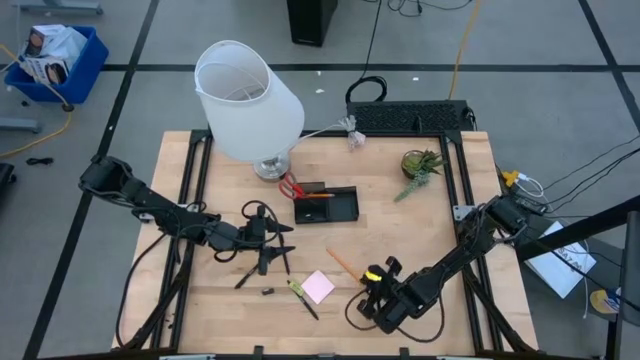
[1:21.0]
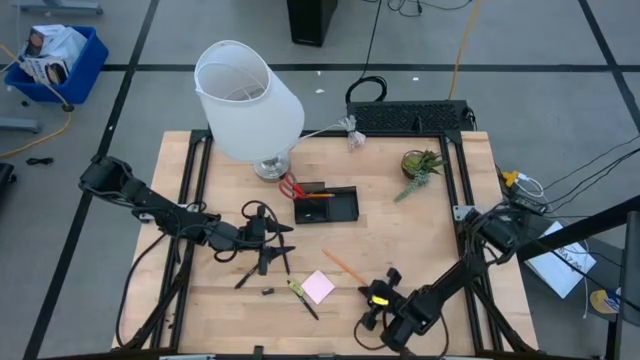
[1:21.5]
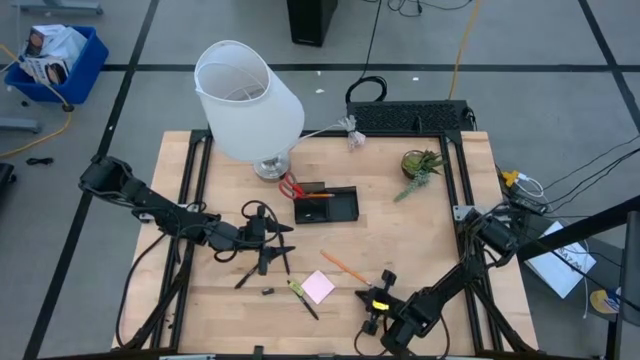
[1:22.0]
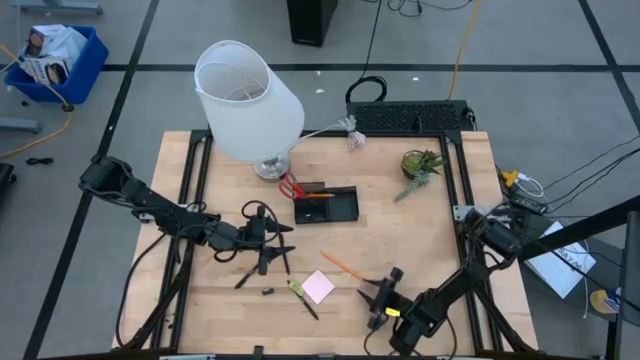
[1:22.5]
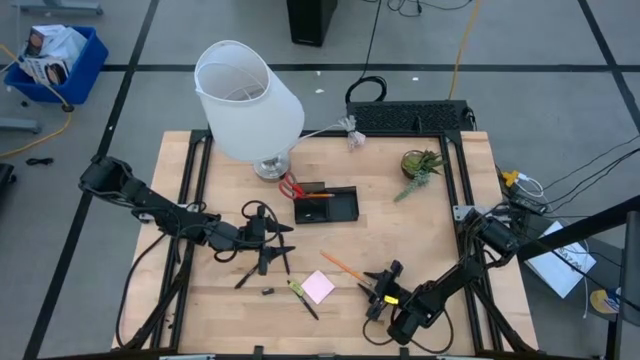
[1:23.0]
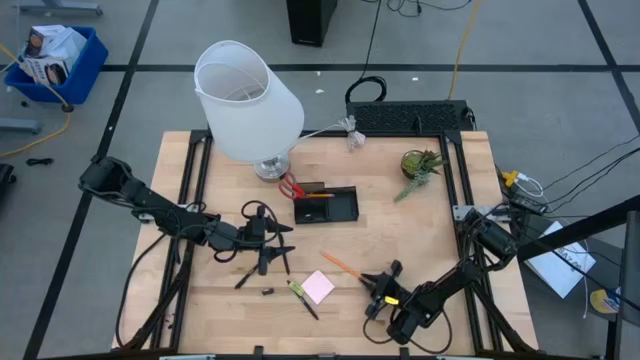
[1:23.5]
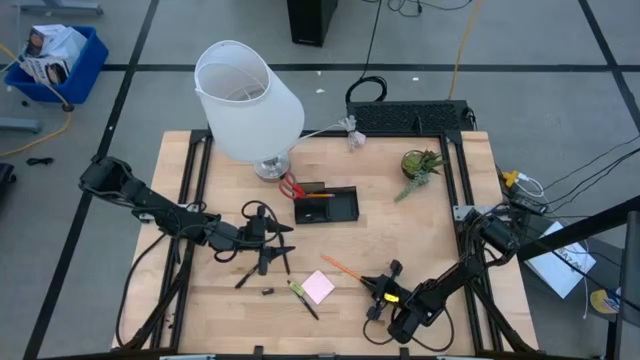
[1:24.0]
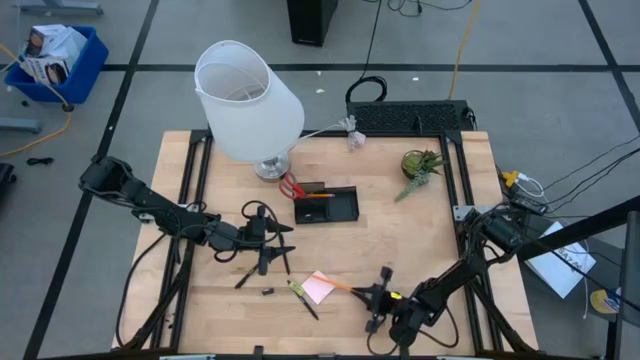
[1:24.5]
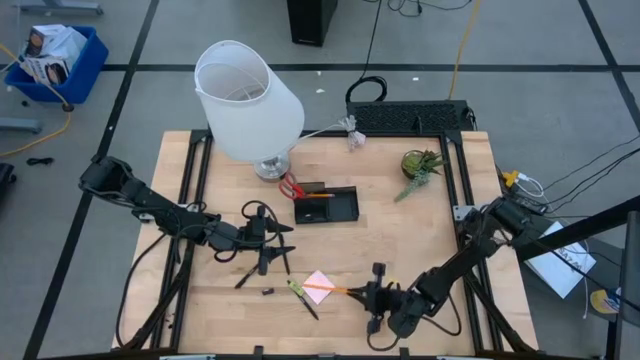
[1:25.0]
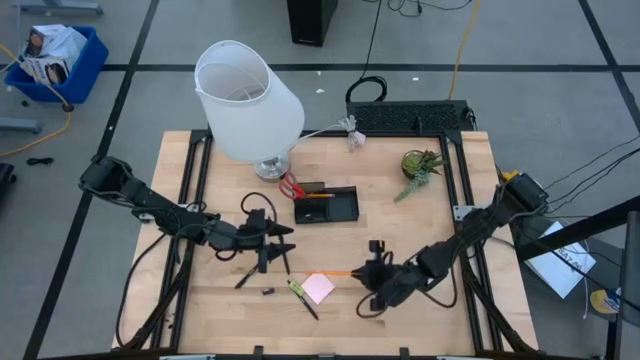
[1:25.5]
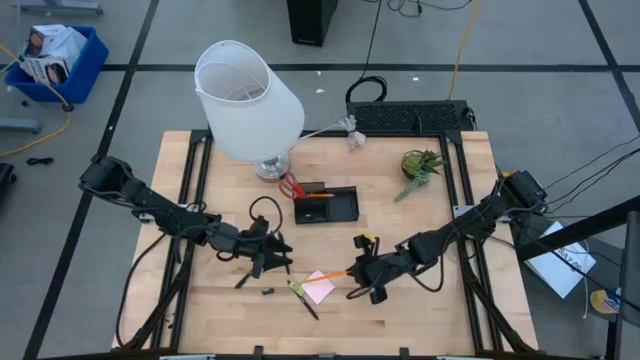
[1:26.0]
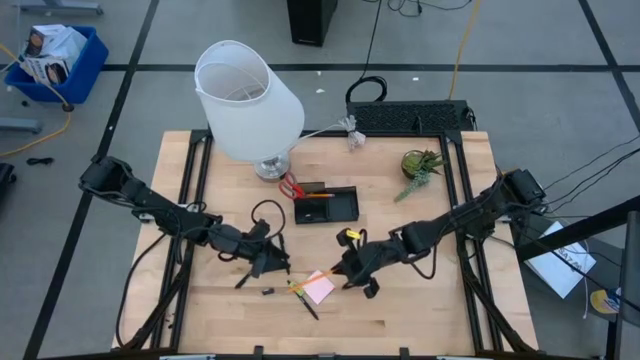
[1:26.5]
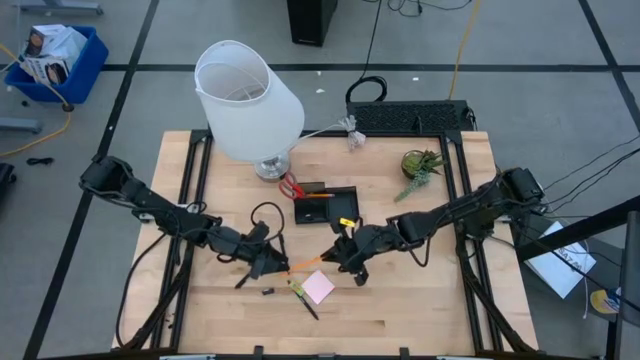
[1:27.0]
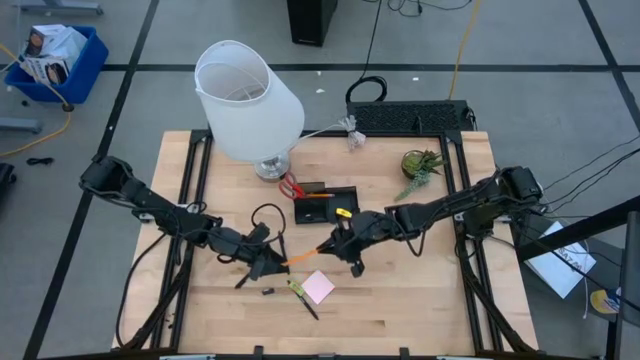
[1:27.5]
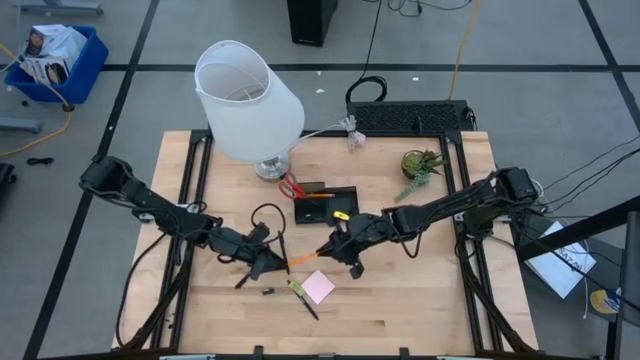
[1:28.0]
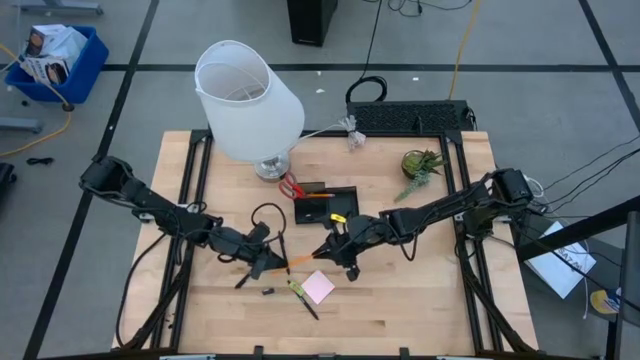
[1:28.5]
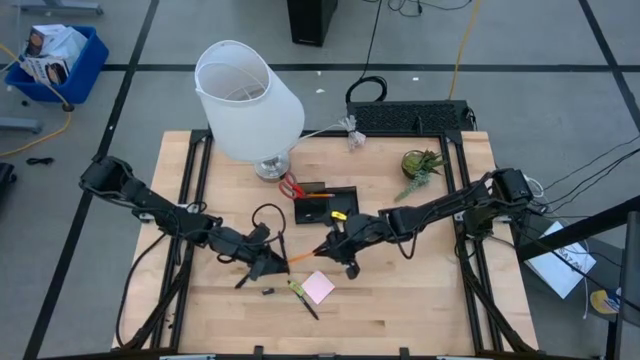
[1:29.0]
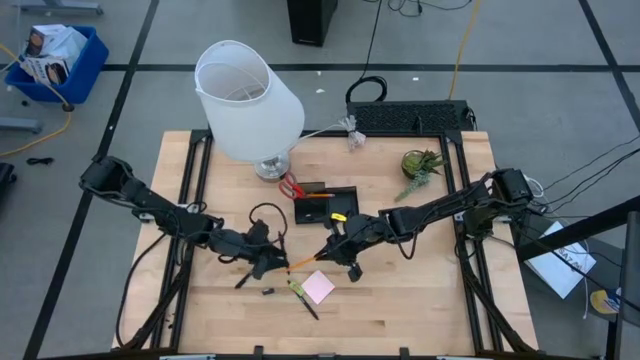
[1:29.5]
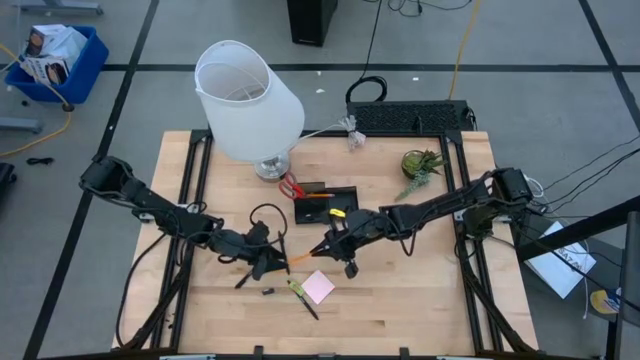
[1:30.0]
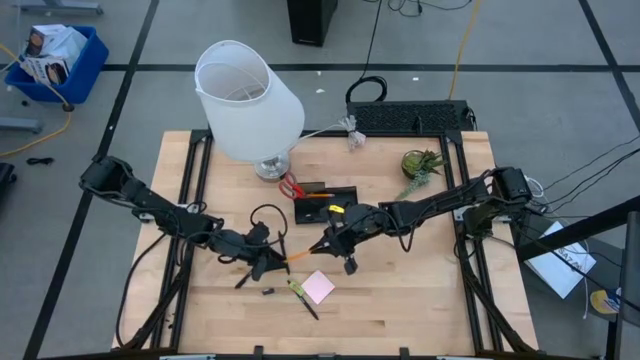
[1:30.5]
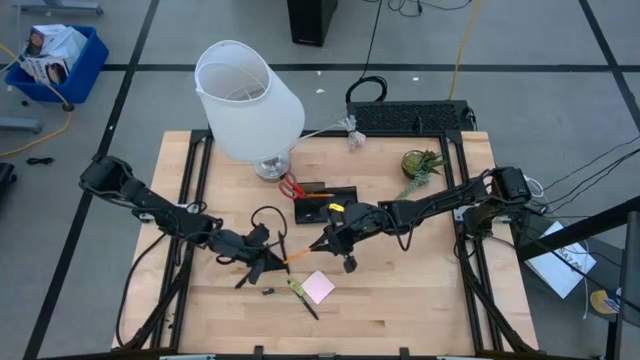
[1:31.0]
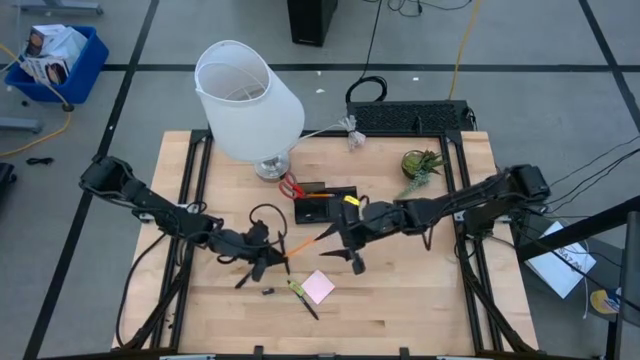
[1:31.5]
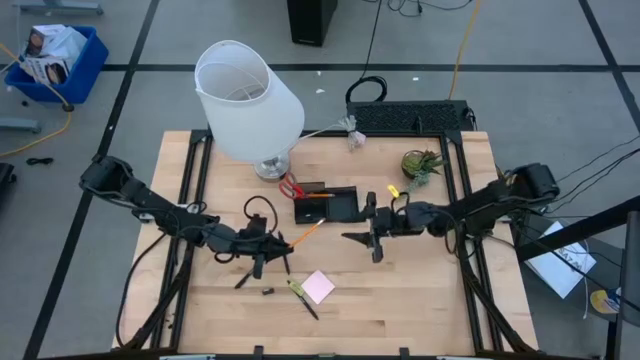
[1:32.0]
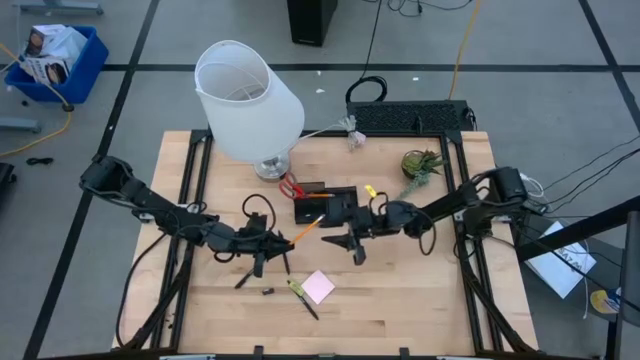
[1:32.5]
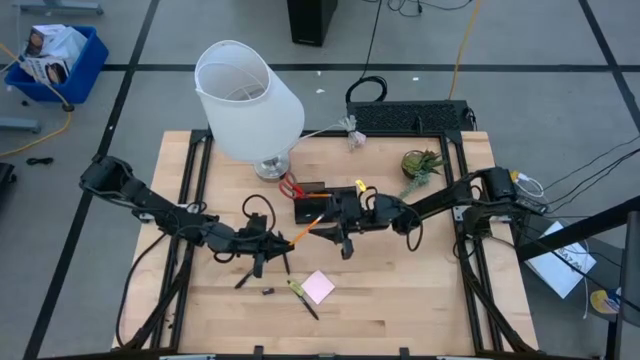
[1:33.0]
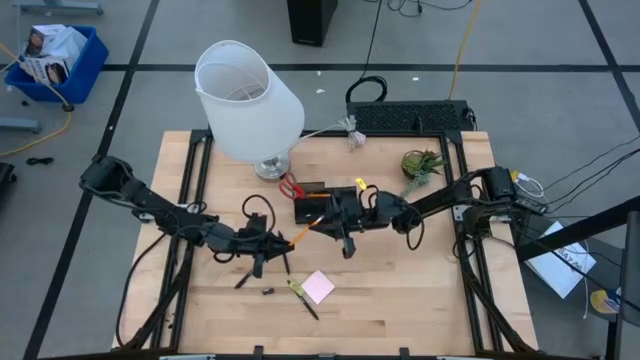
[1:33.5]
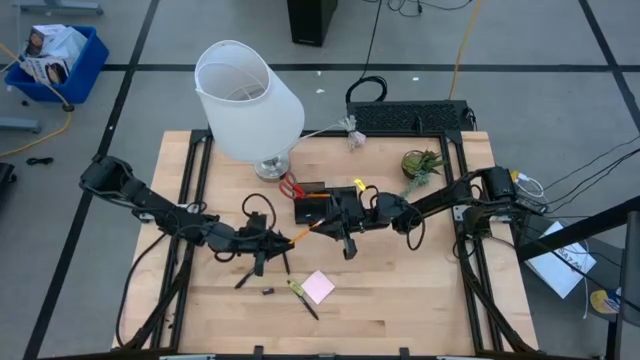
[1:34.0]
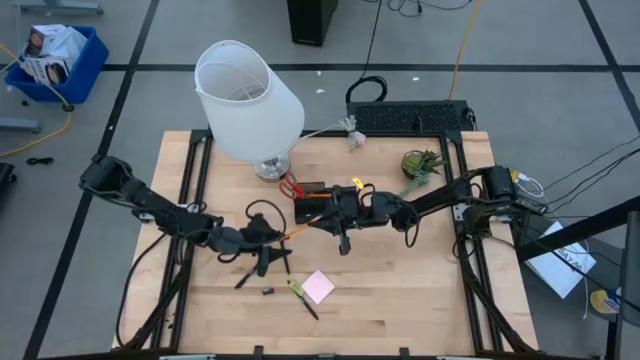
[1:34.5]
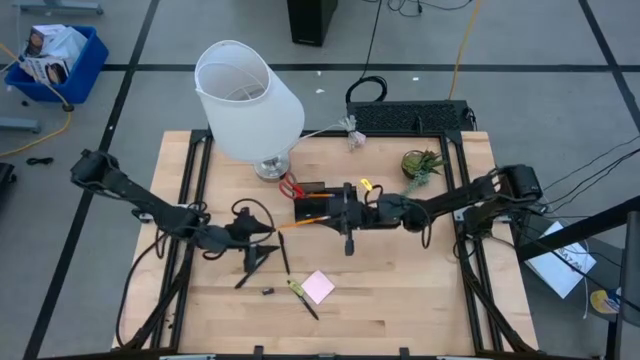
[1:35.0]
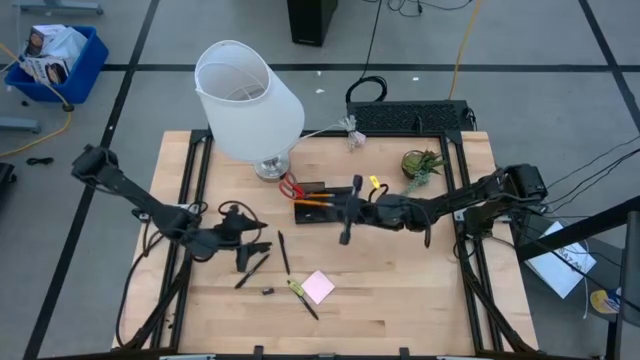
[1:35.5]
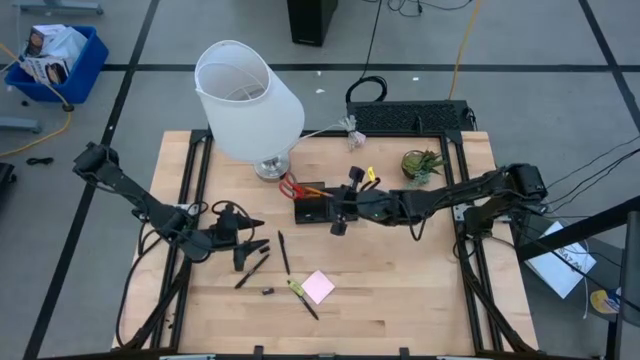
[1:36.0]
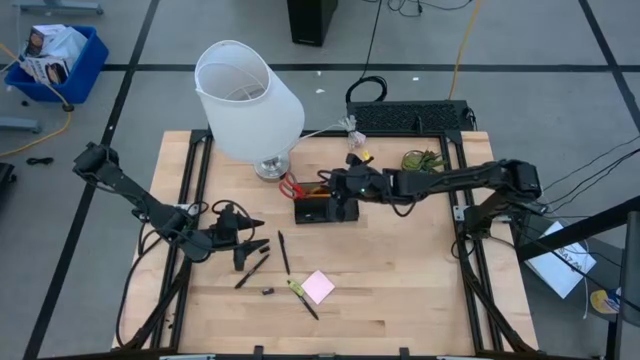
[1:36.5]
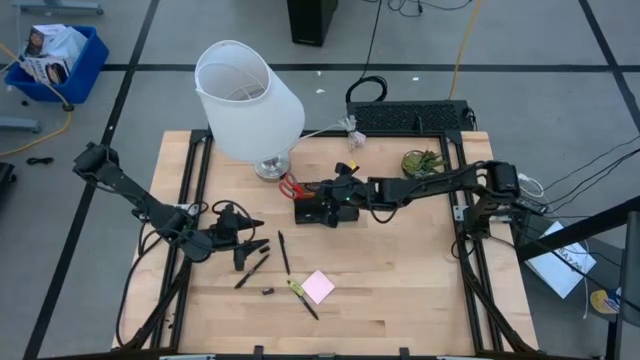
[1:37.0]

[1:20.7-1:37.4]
Task: Pick and place office supplies into organizer
Put the yellow pencil into the top left compartment of the desk organizer

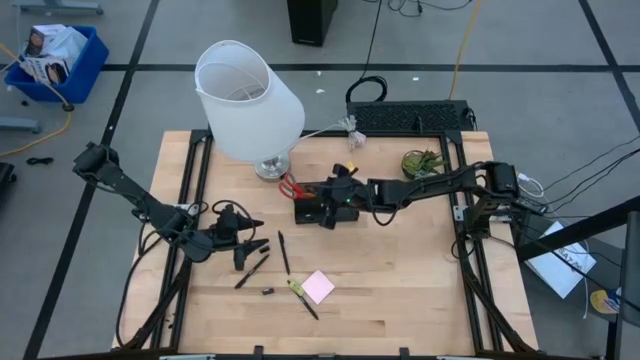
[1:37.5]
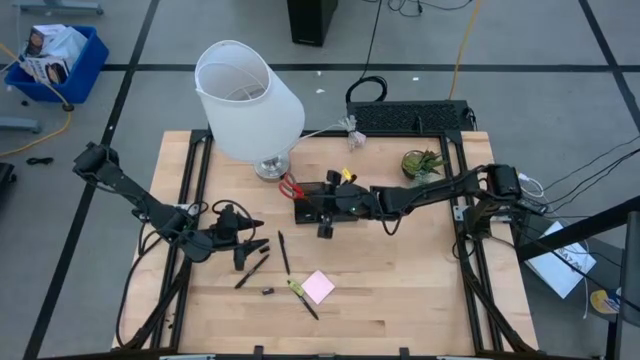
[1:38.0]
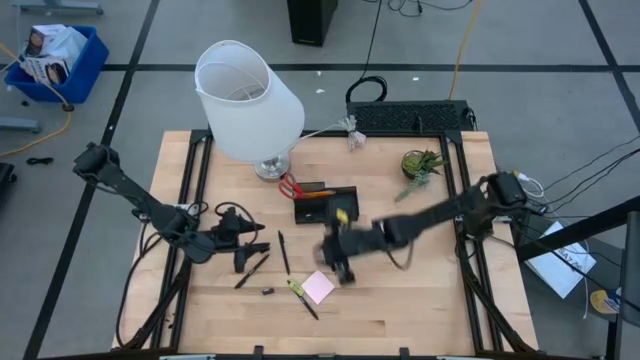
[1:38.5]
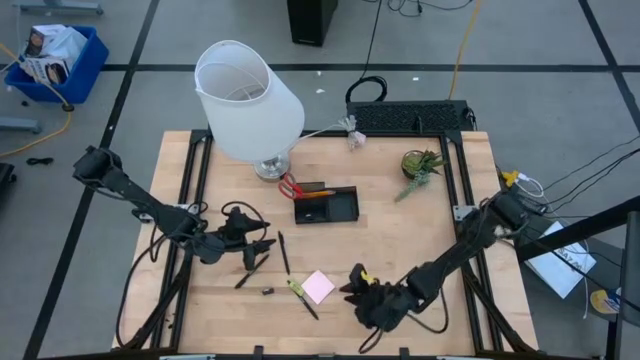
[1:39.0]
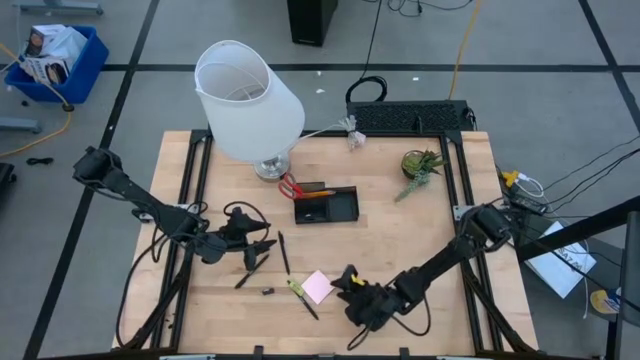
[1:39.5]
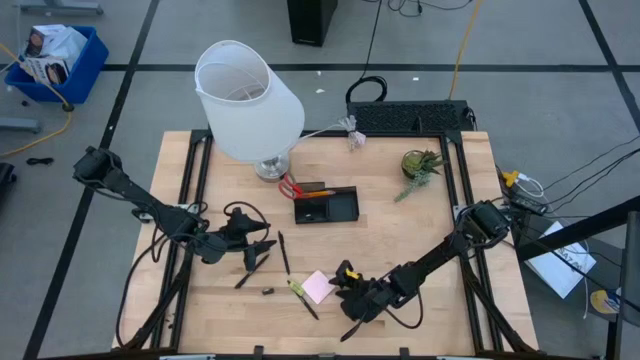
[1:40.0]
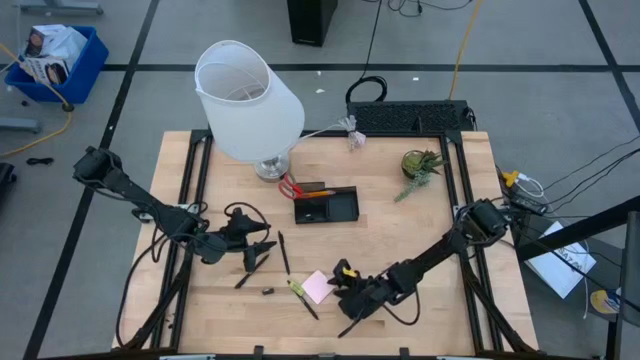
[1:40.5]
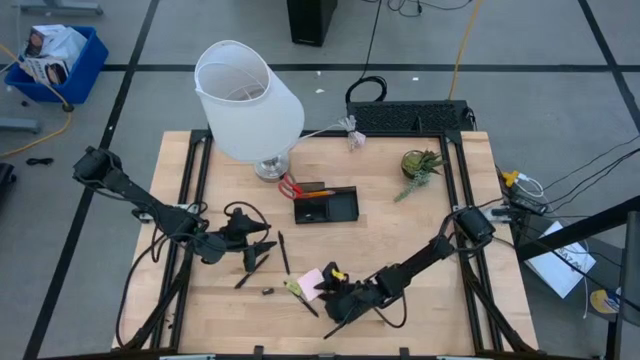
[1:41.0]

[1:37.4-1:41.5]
Put the pink sticky notes into the right compartment of the desk organizer

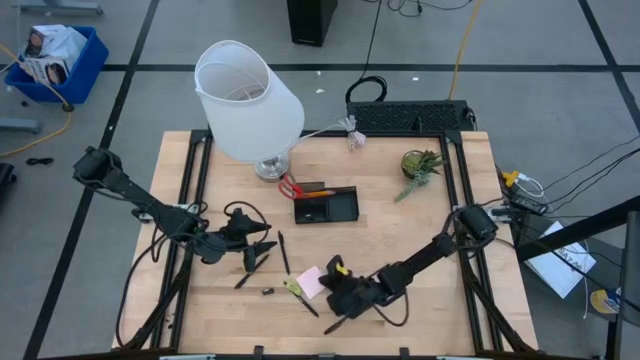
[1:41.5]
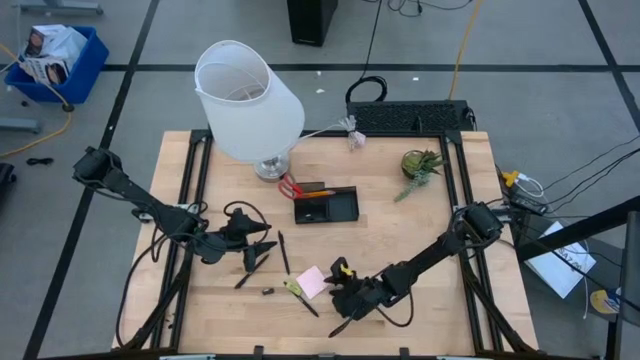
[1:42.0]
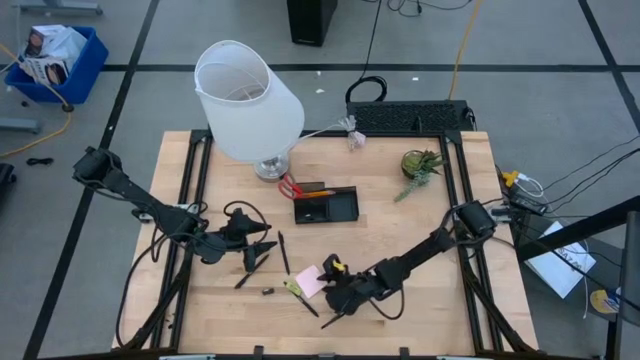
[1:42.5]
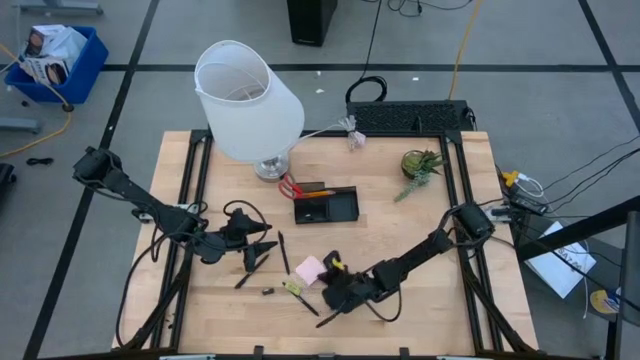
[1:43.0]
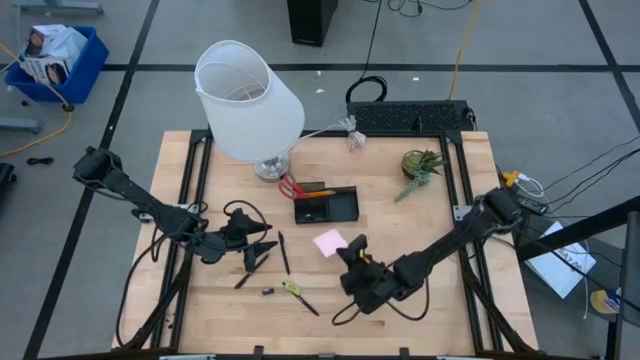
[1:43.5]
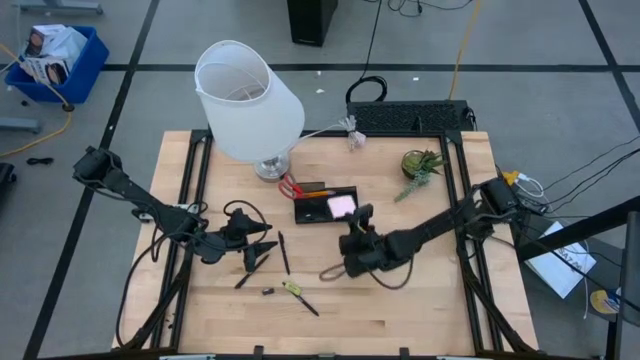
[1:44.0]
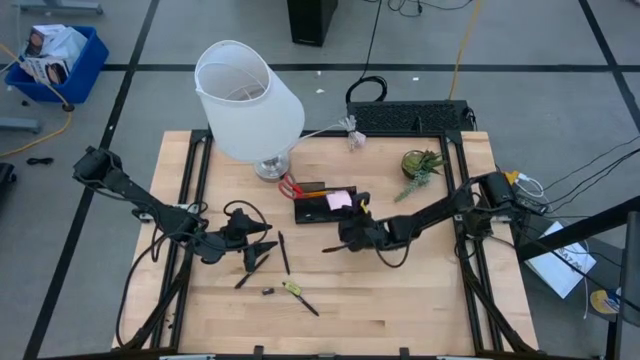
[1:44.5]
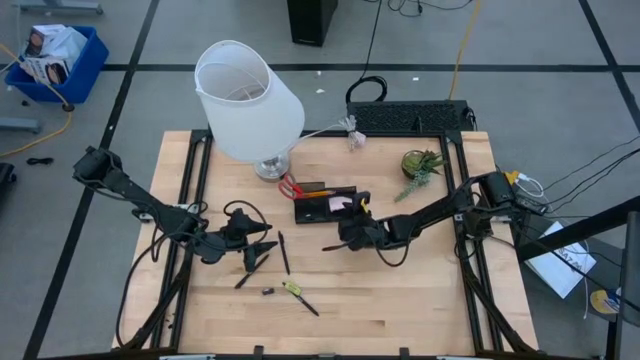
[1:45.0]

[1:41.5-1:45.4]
Put the pink sticky notes into the right compartment of the desk organizer
